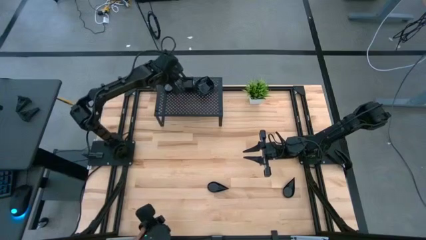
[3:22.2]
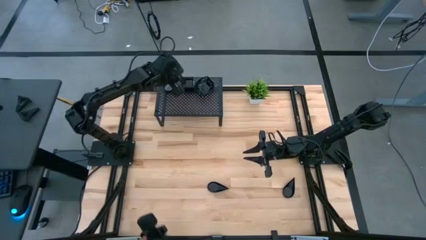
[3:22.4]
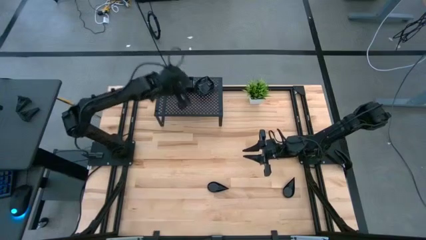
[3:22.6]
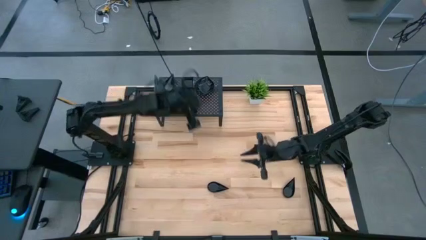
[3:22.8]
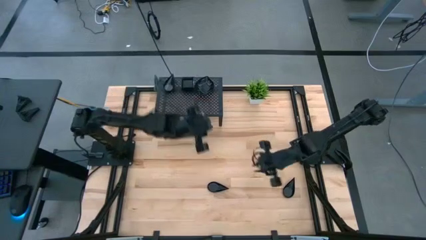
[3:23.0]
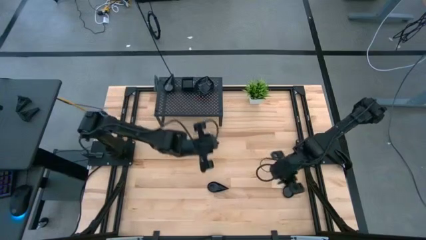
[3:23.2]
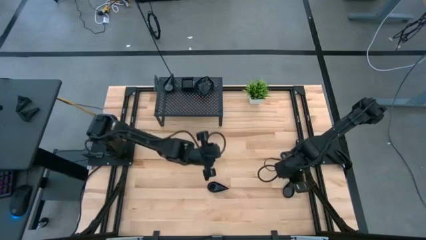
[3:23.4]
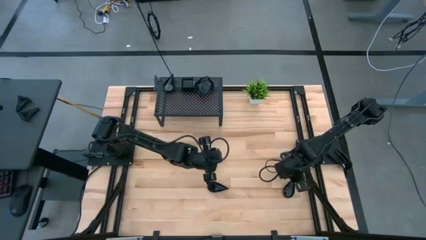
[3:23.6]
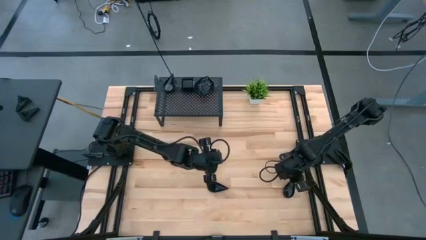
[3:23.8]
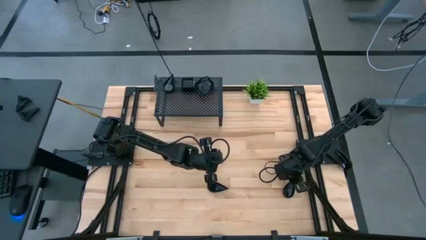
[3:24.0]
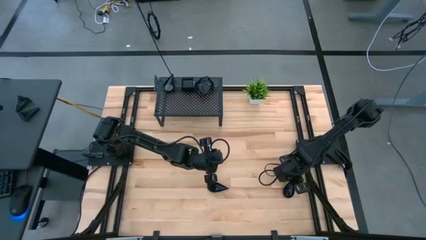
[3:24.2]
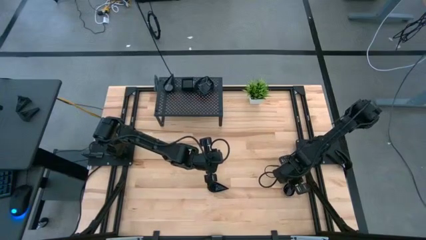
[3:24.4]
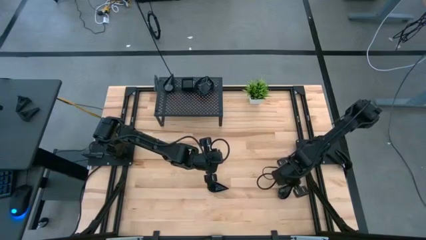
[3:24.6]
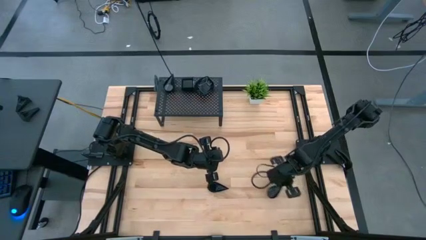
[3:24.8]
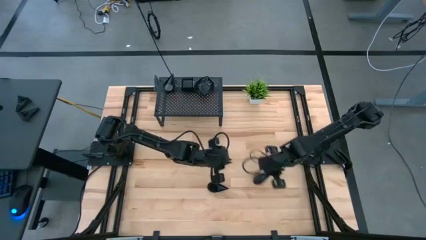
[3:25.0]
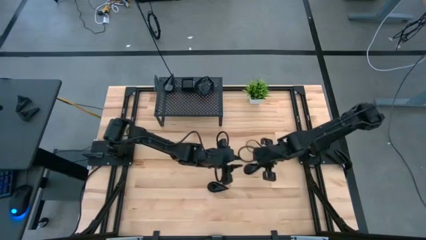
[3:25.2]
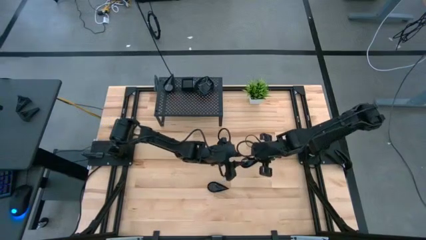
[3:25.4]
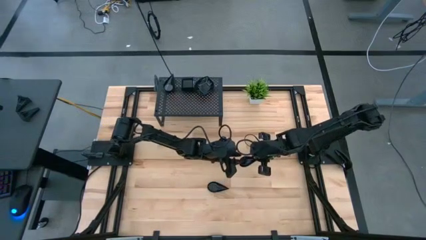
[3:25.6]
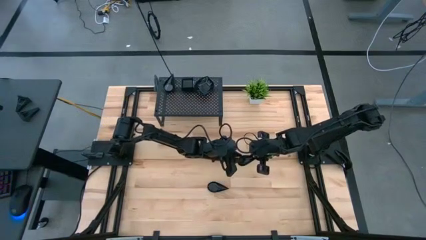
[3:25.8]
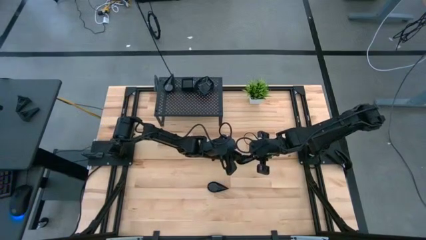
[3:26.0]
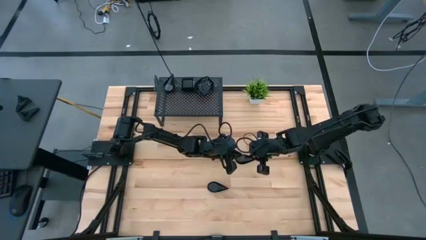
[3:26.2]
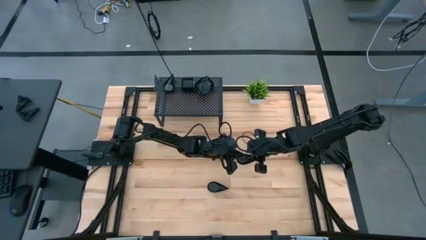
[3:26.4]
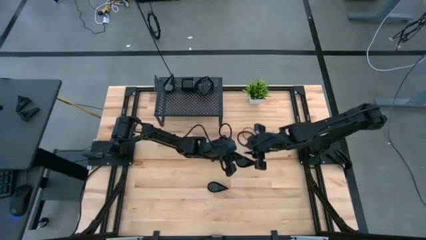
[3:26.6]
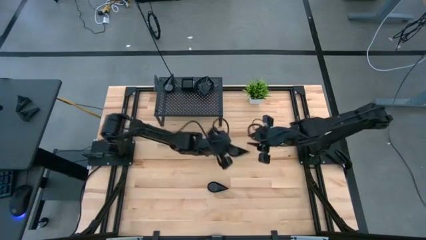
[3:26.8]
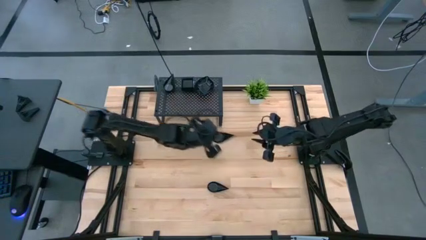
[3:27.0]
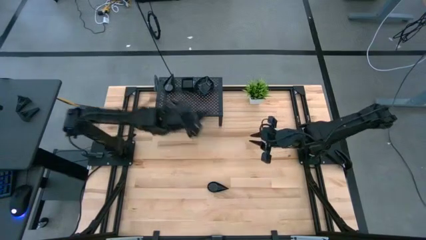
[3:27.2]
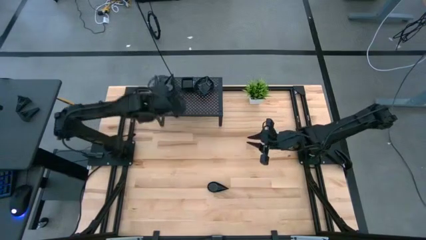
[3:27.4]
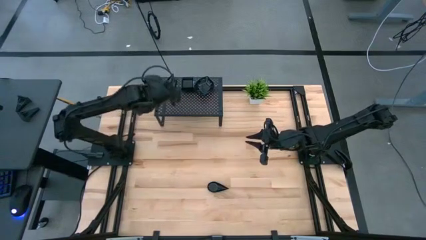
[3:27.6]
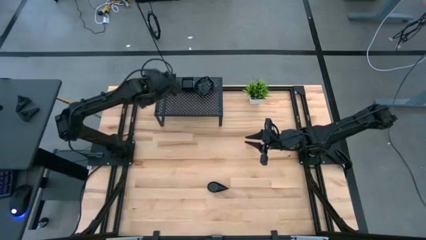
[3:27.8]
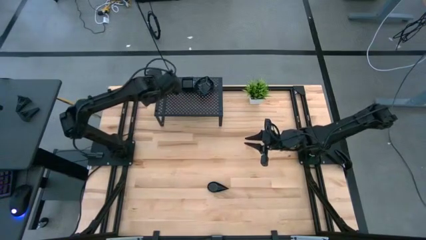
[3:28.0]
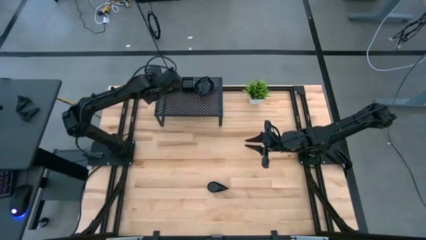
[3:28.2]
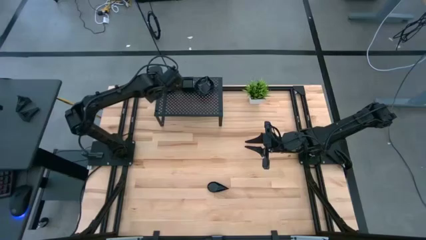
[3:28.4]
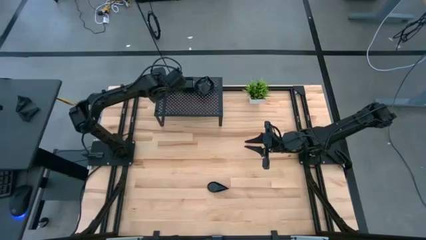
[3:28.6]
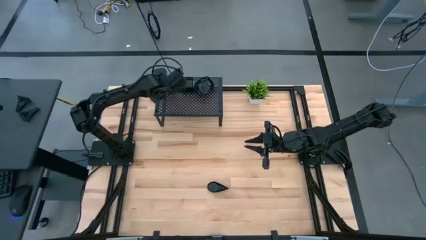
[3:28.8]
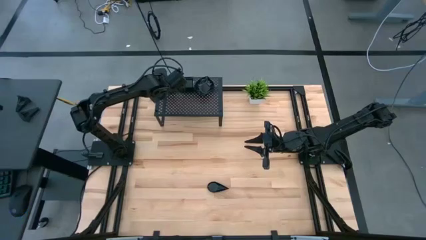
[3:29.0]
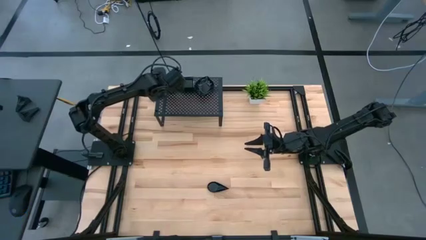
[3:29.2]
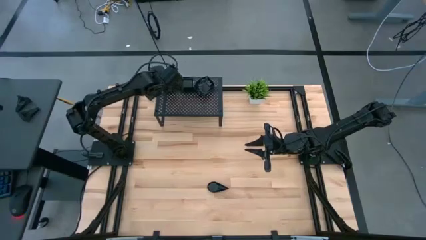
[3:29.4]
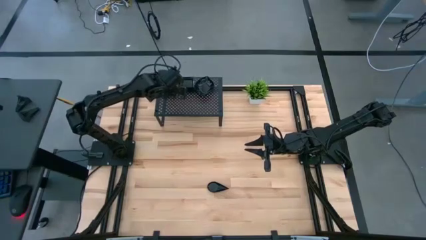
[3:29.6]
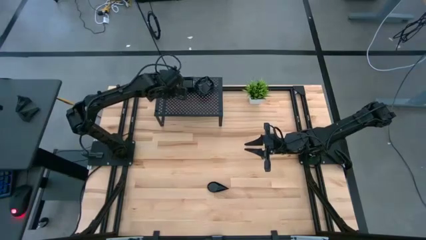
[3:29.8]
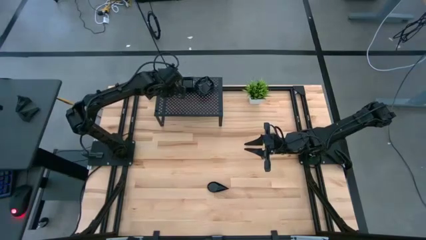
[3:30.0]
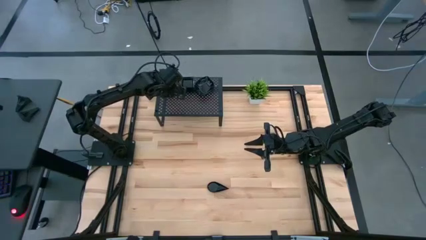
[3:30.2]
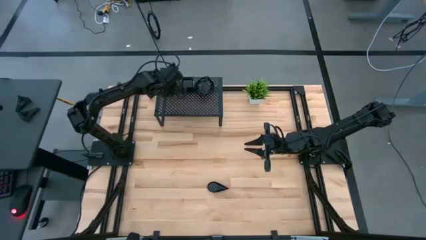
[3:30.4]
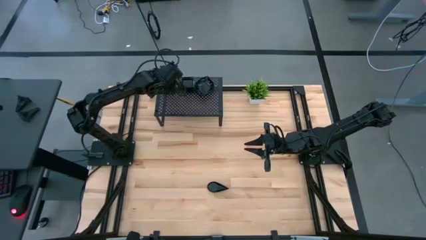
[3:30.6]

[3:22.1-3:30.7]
Task: Pick & Place Mini shaped plates
Stack the black drop-shaped plate on top of the drop-shaped plate on the shelf

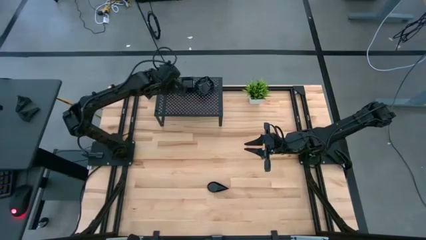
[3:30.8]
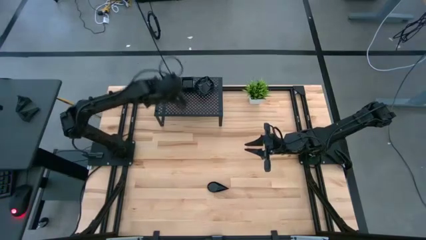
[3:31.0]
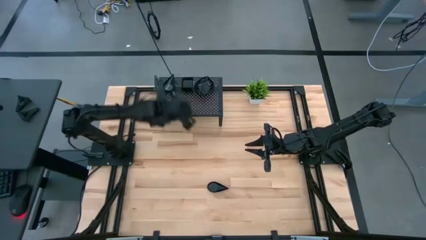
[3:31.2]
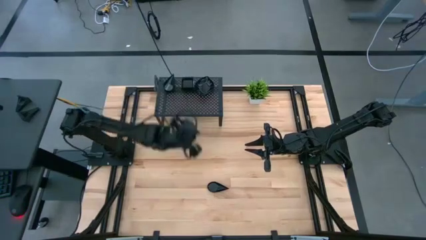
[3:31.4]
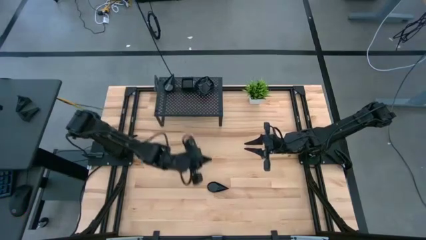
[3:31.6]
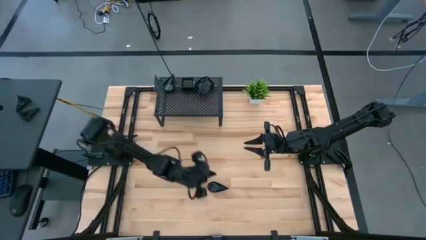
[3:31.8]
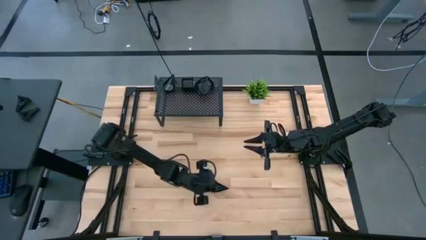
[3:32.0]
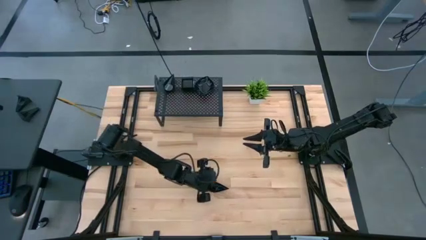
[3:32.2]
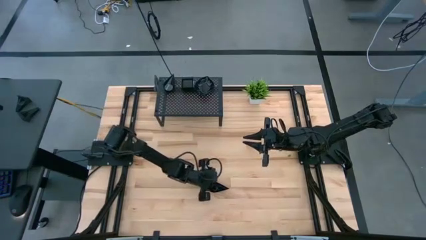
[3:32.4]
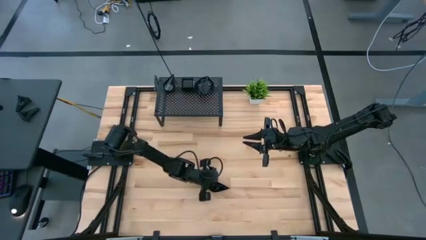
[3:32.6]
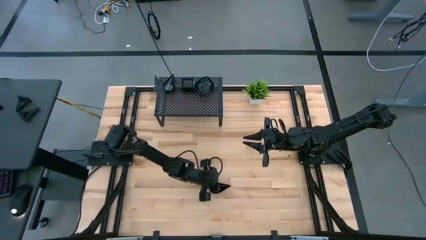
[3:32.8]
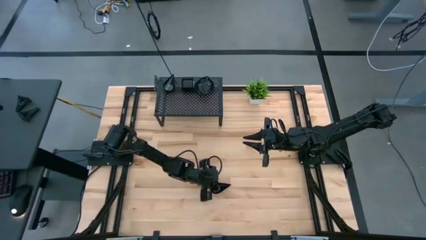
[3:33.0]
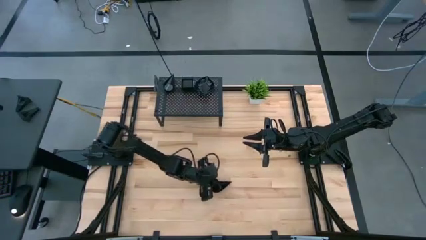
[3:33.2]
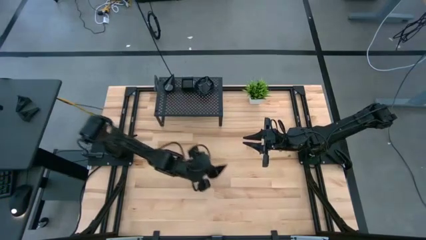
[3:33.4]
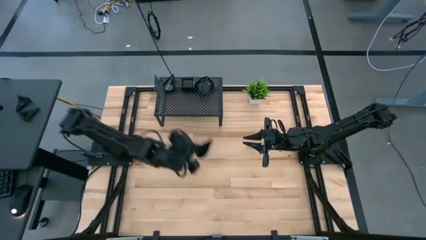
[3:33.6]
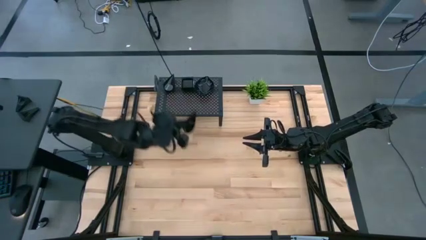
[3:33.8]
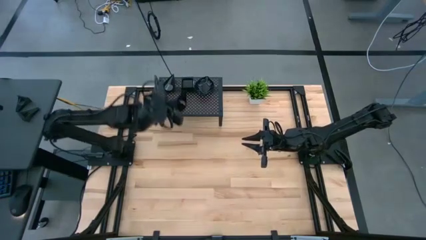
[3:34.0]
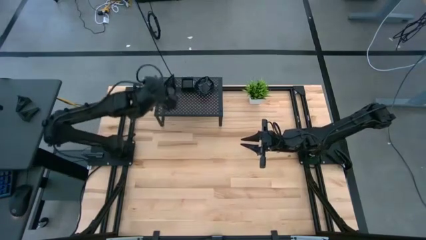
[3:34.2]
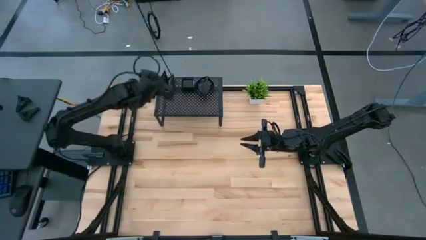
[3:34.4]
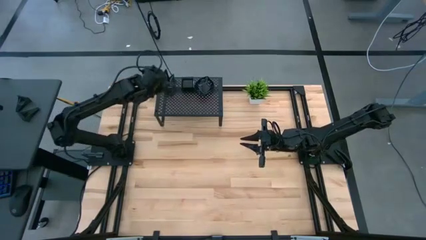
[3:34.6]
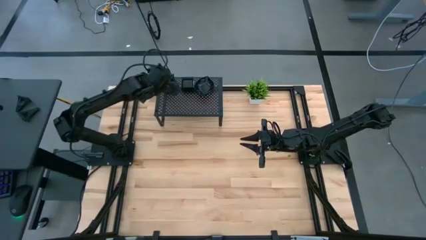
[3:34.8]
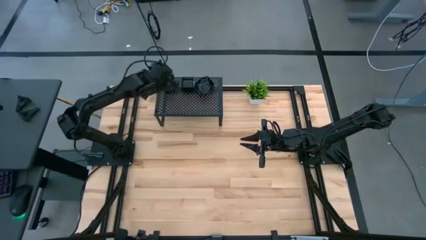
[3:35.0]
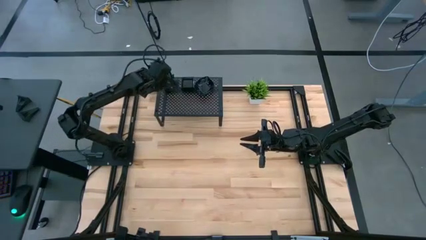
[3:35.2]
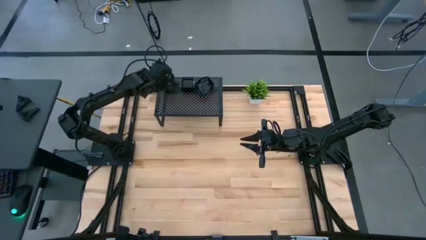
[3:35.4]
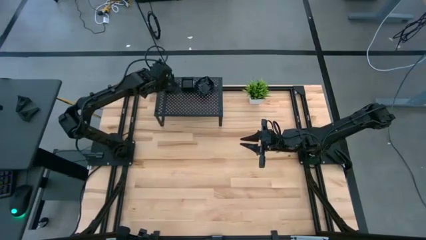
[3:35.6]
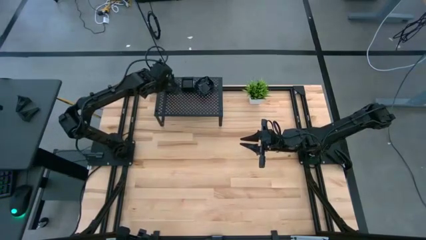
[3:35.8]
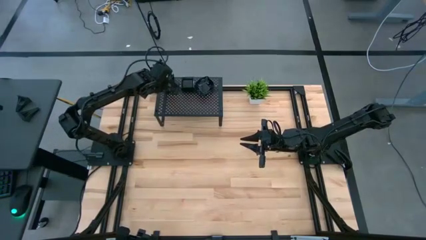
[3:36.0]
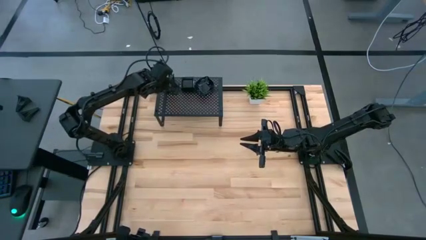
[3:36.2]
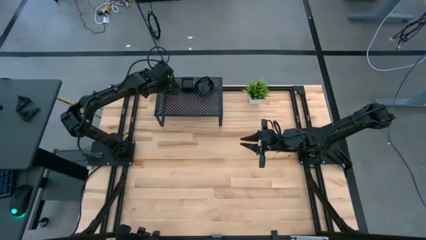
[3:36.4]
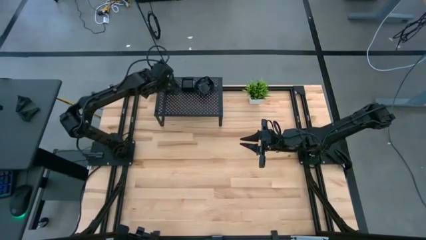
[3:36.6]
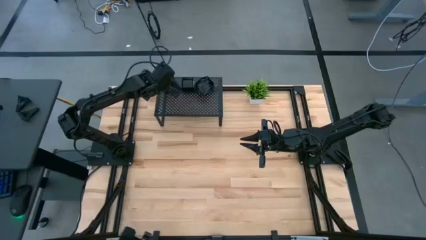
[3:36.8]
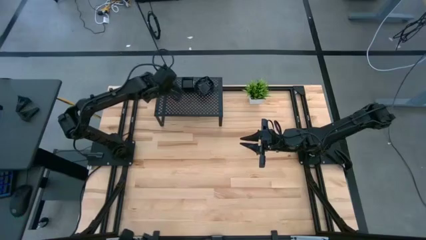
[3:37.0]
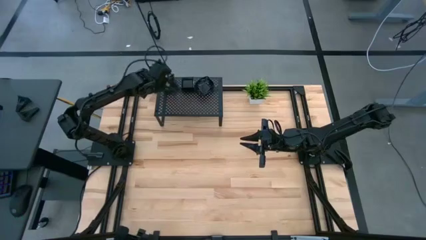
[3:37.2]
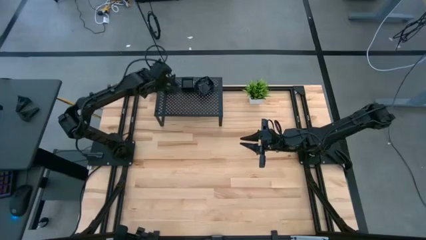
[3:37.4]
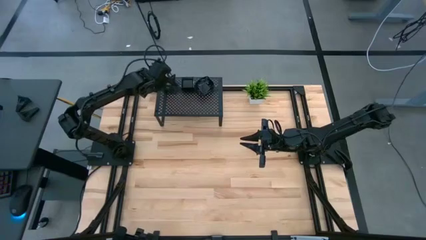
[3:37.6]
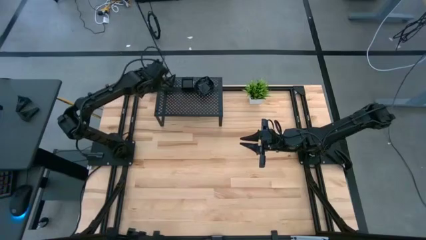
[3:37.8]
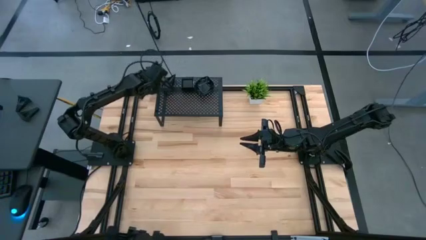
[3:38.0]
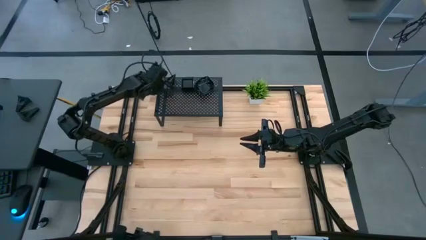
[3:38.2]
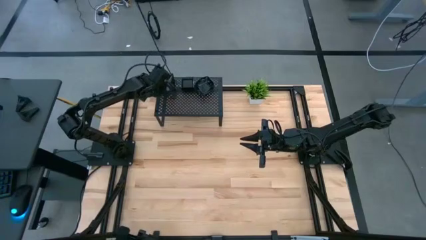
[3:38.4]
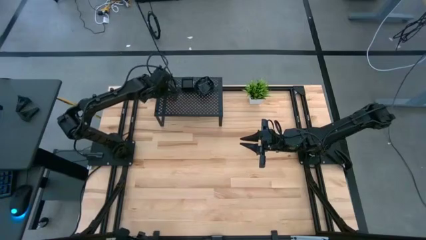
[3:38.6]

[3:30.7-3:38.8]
Stack the black drop-shaped plate on top of the drop-shaped plate on the shelf
